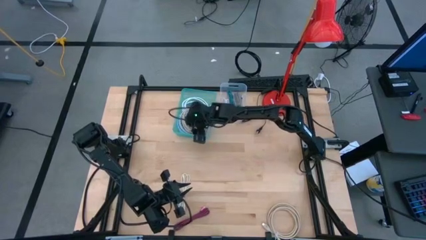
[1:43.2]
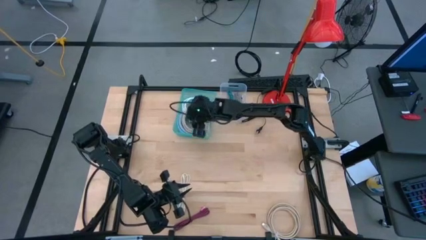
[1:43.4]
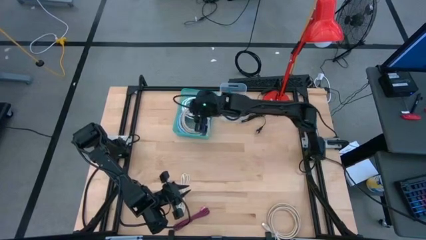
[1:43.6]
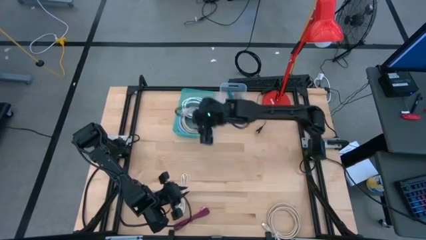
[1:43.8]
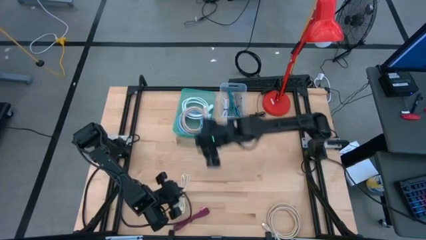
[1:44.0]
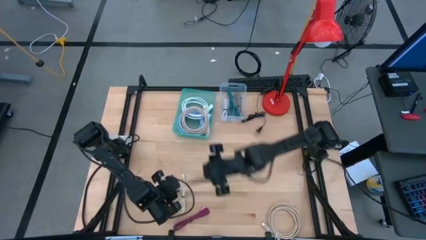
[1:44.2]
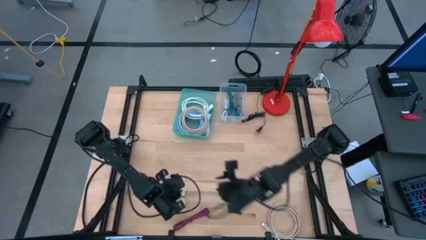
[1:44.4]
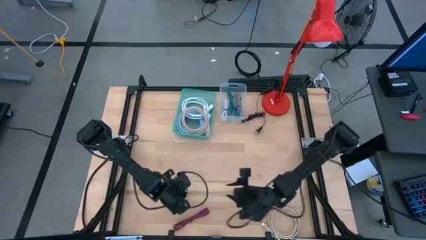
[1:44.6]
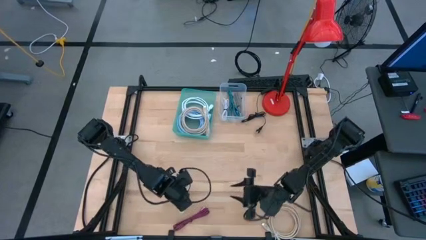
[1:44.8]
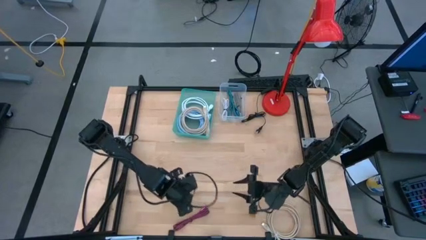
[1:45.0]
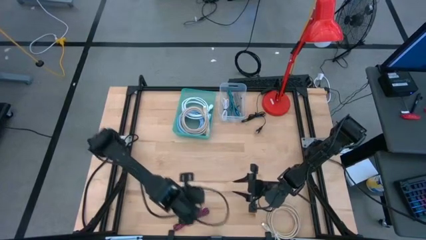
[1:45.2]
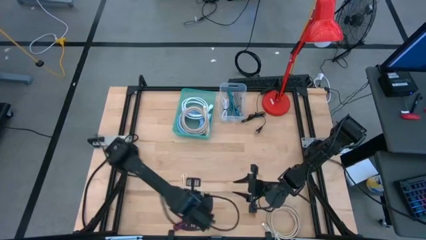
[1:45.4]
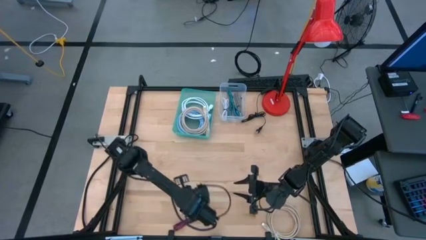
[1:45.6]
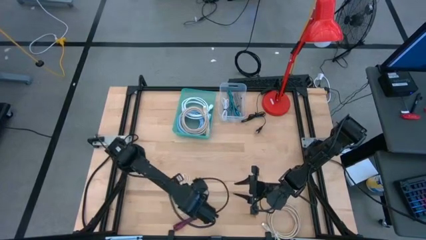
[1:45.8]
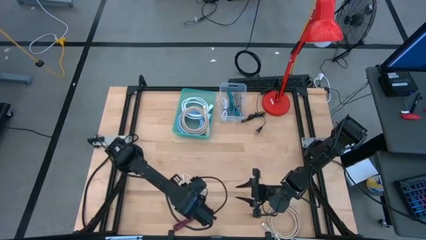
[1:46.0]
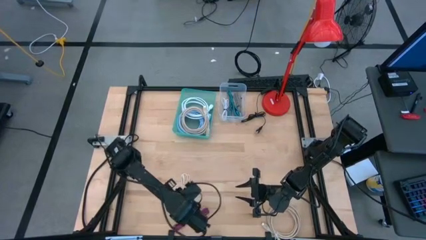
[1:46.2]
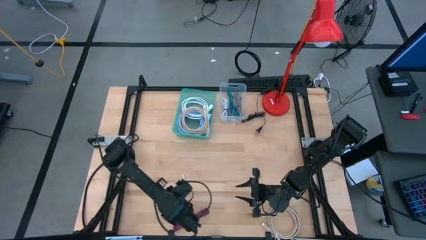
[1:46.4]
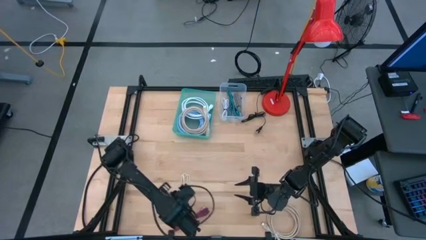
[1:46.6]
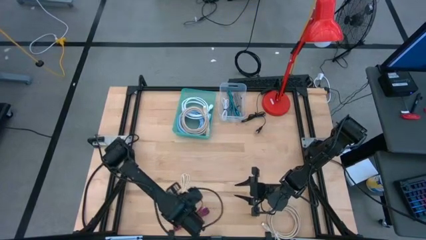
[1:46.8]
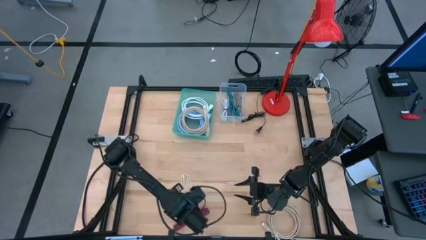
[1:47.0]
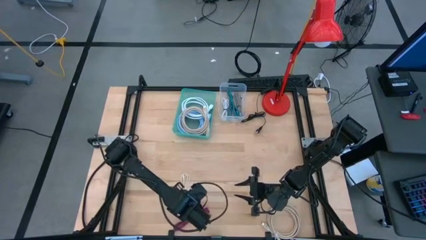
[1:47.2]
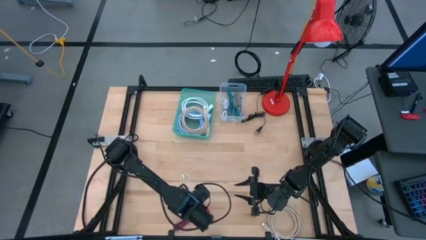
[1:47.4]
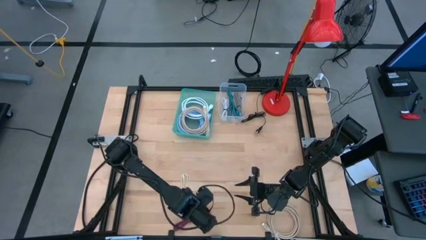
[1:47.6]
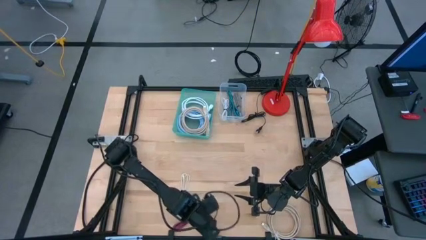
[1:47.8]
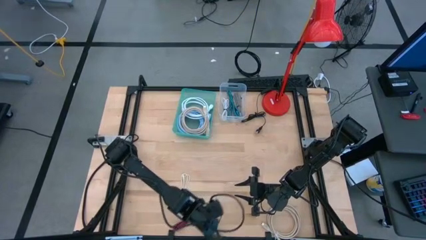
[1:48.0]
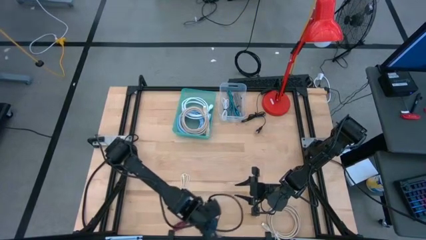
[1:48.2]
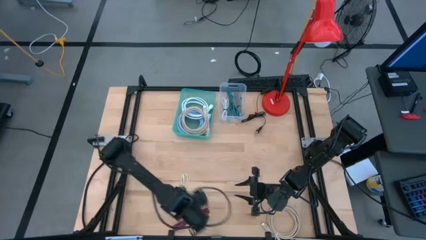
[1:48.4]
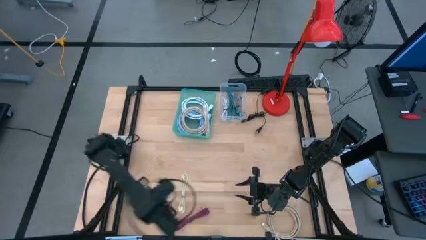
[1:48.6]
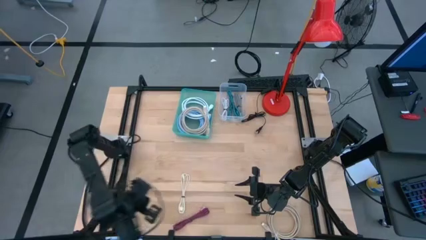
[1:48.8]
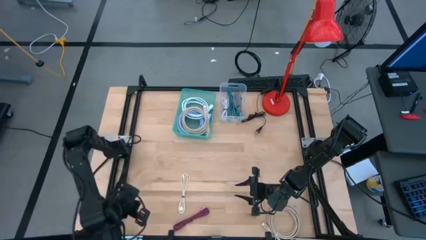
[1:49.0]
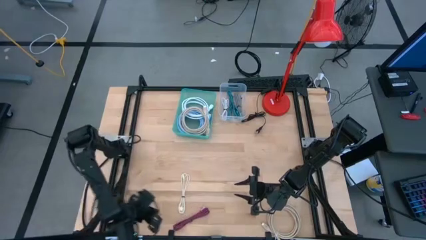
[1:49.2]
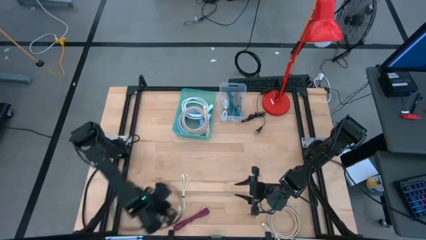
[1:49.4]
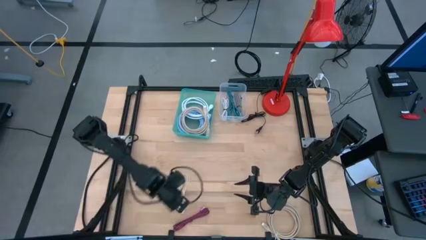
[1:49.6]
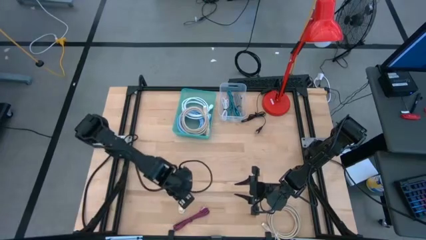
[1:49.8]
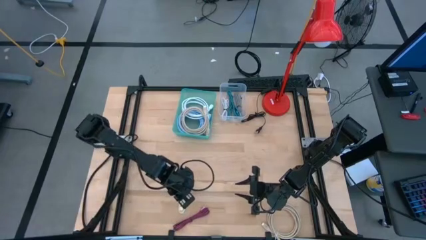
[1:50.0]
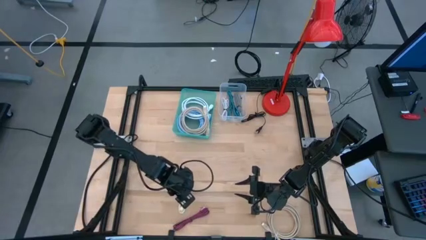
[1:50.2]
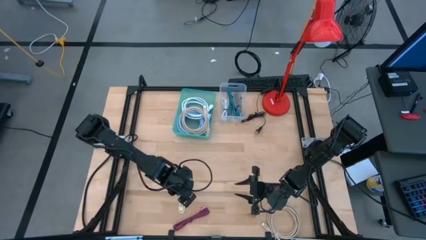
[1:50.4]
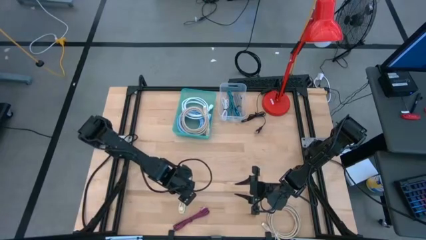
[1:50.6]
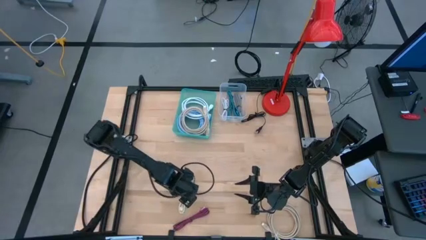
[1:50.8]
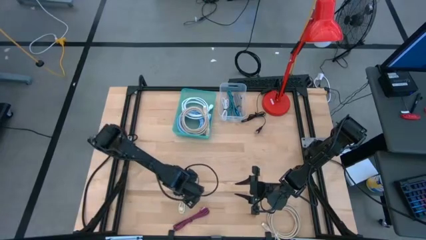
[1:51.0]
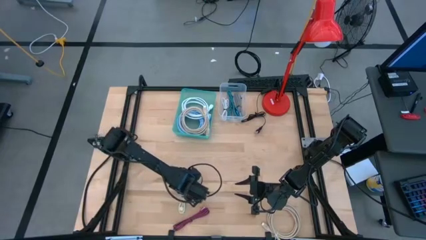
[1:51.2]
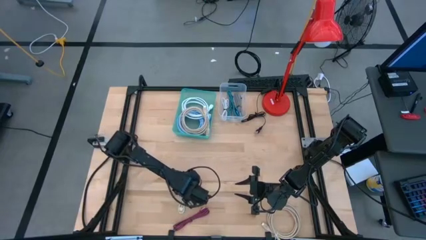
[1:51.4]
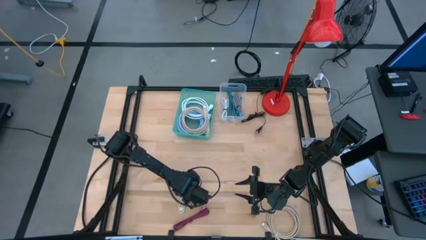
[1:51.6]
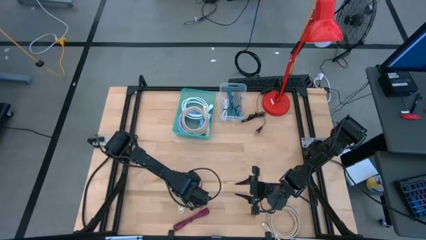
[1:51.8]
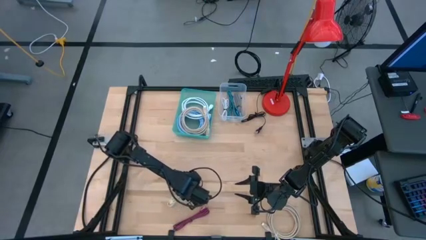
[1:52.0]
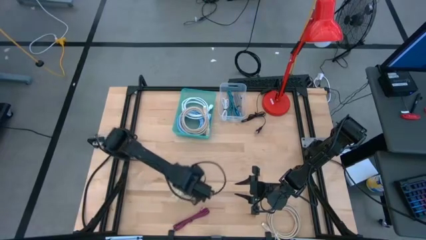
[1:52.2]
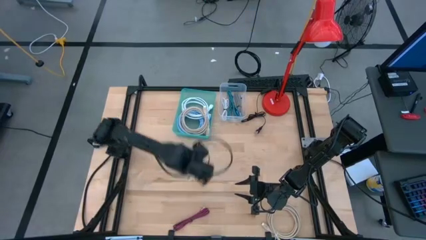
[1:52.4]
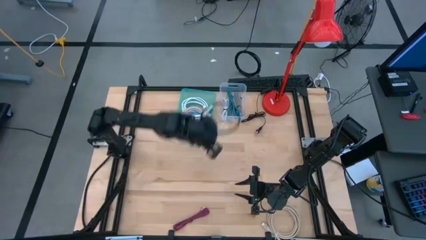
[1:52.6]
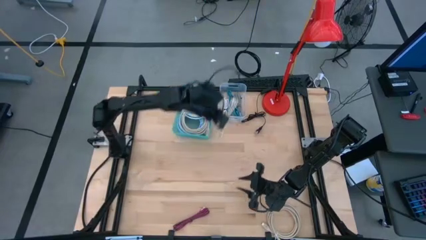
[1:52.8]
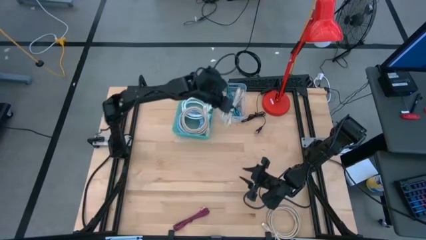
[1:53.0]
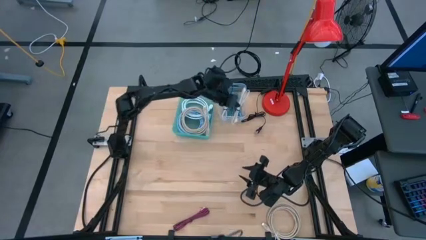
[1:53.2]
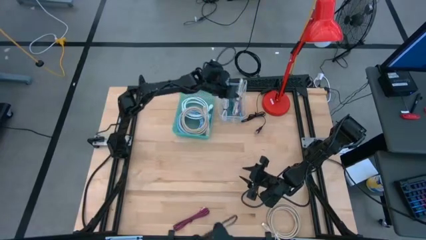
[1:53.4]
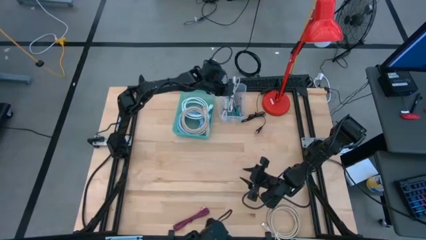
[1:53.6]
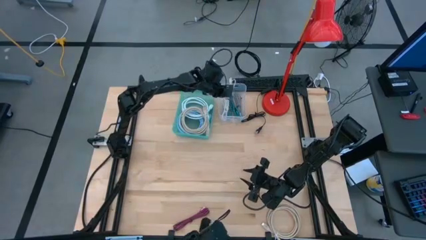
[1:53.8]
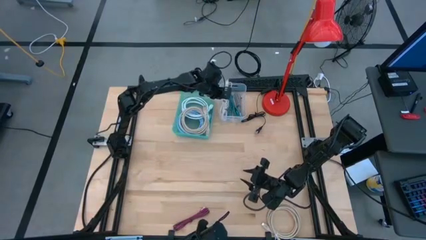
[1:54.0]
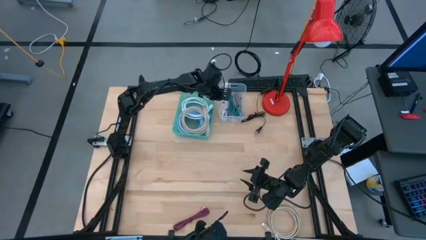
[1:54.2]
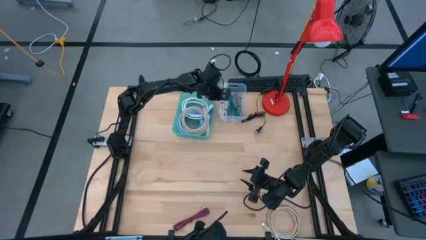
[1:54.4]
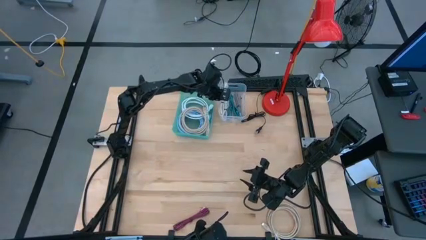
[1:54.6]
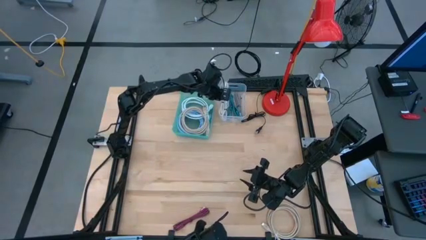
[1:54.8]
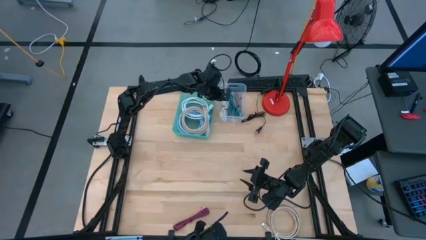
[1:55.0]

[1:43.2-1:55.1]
Task: Pick and place items into bin
Put the light brown charger cable into the transparent bin

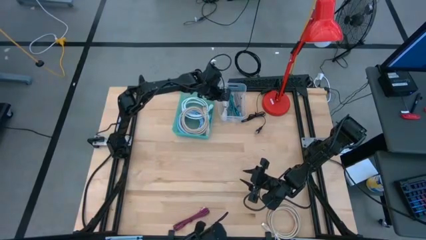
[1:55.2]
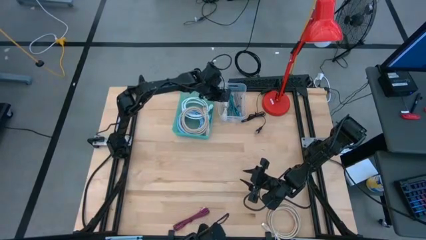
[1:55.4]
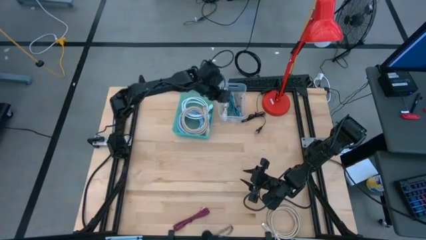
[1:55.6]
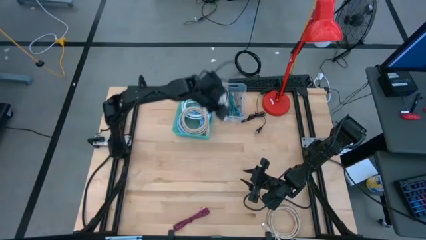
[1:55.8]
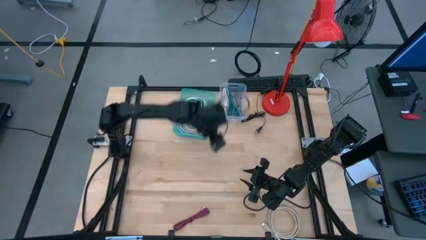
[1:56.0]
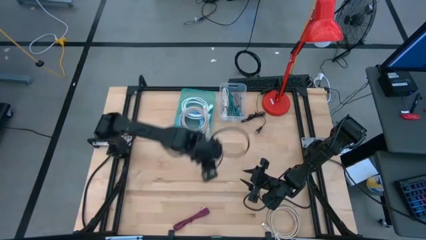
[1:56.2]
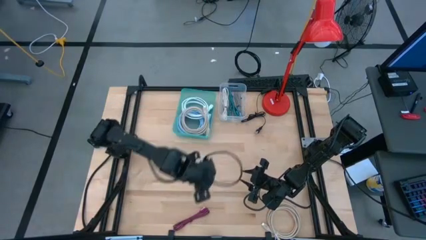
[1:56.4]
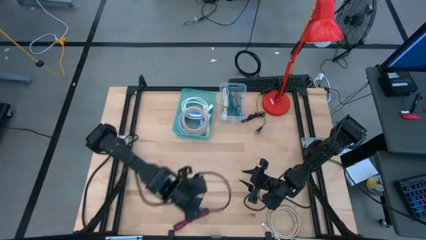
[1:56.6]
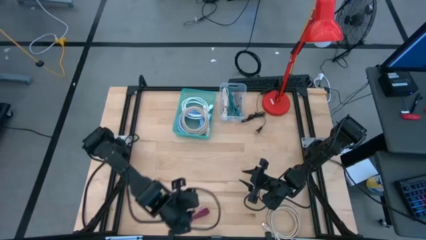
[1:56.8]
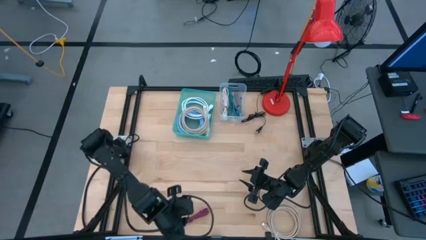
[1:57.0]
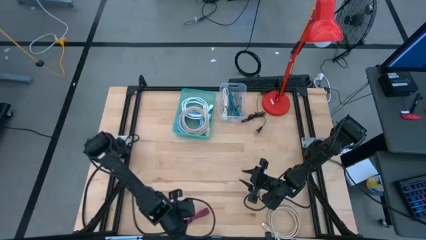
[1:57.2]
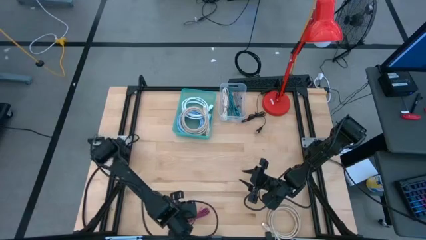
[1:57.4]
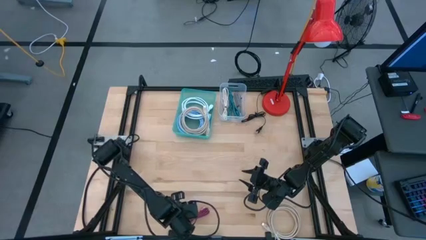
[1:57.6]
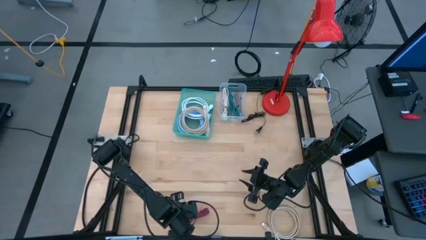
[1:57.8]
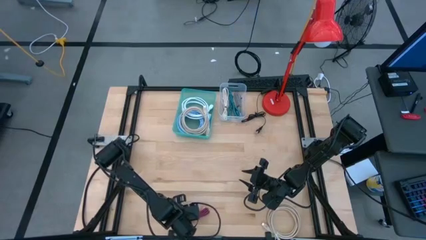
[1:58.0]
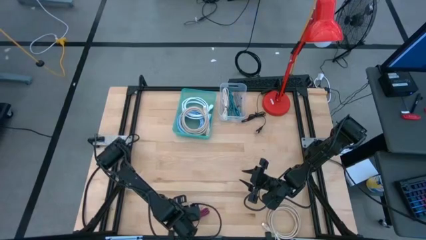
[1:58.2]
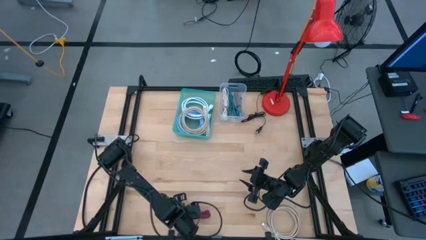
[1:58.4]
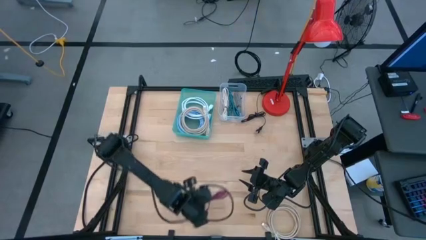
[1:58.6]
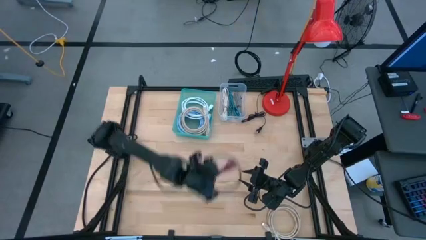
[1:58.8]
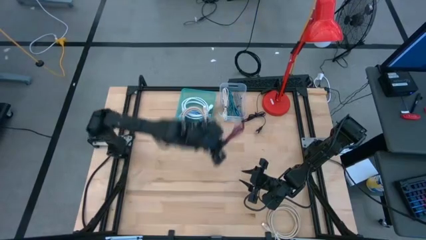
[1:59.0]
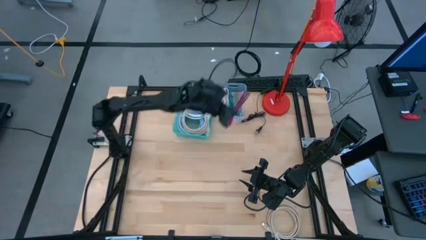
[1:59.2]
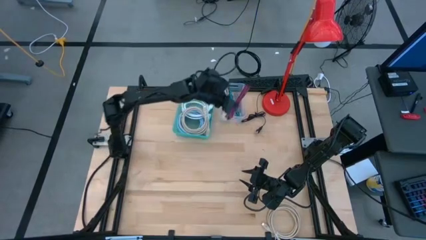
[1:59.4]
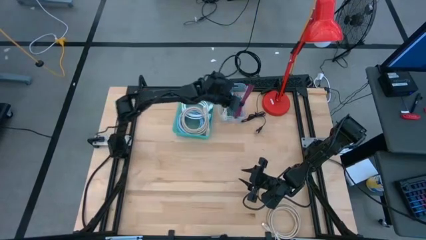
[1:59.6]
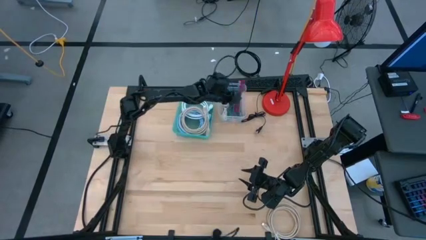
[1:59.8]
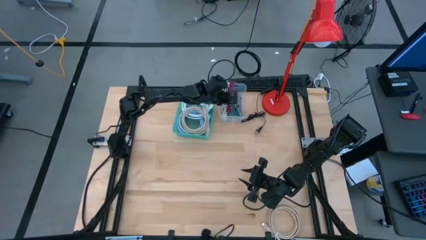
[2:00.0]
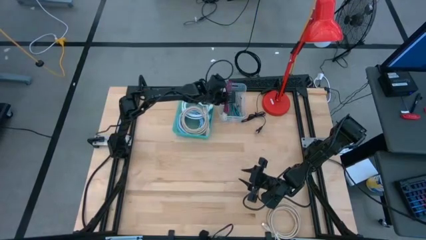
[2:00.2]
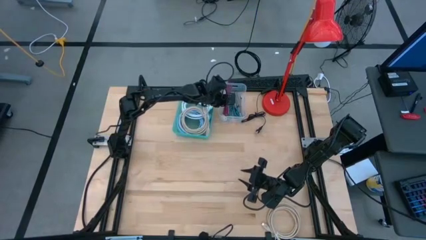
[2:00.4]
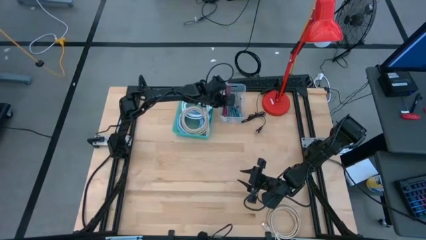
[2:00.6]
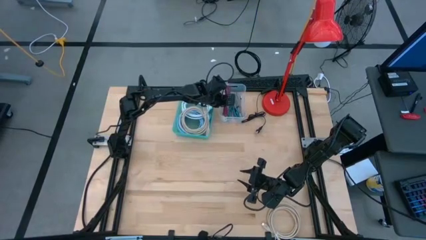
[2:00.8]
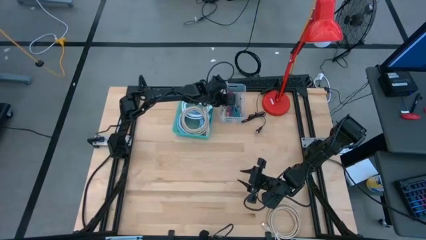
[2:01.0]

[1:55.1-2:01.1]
Put the black pink charger cable into the transparent bin
